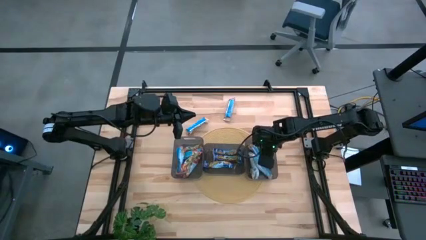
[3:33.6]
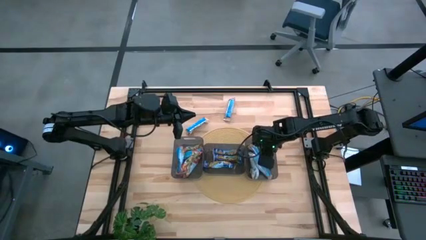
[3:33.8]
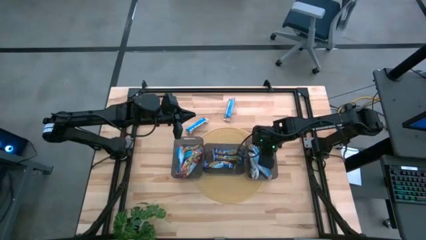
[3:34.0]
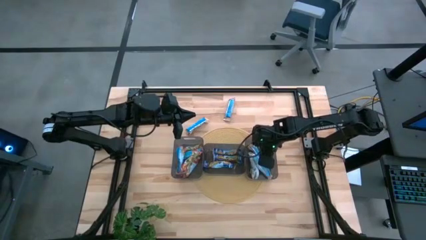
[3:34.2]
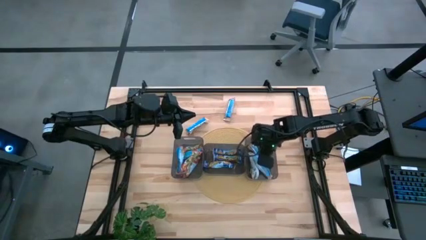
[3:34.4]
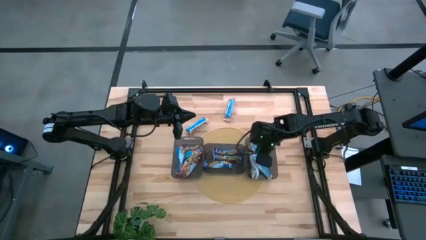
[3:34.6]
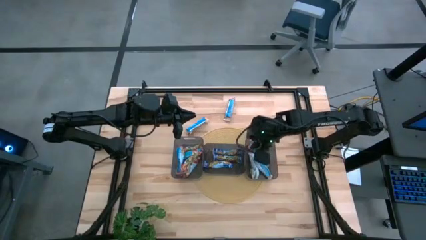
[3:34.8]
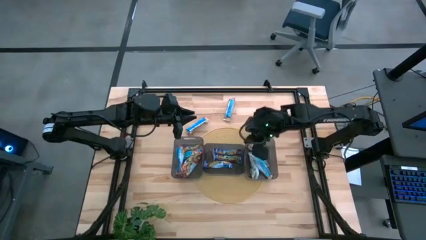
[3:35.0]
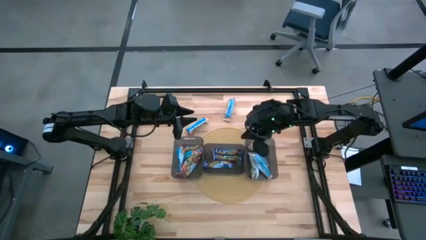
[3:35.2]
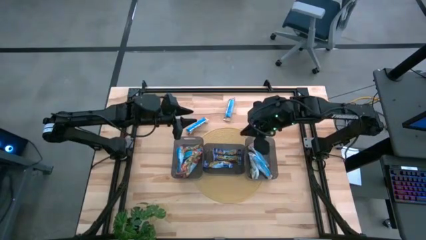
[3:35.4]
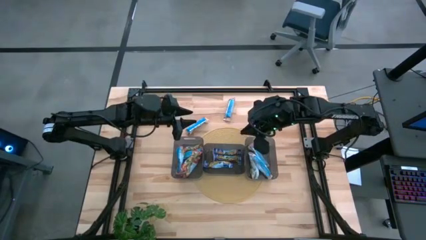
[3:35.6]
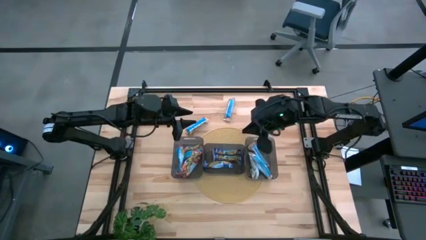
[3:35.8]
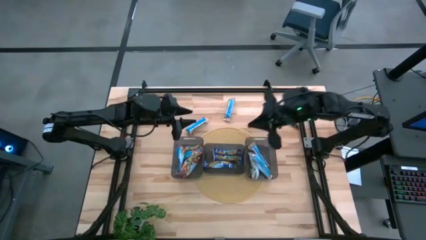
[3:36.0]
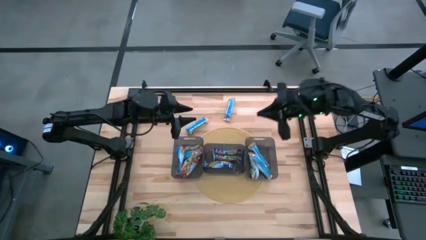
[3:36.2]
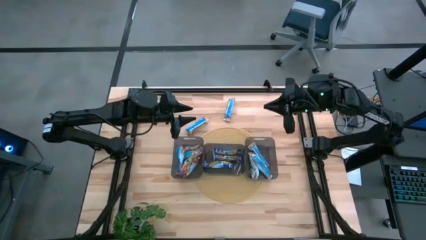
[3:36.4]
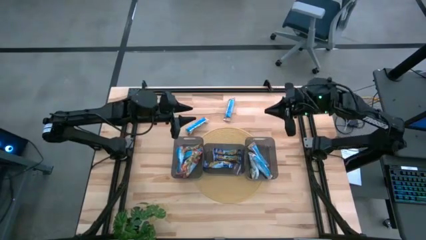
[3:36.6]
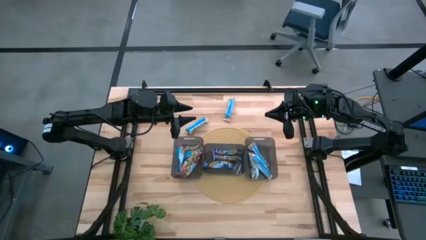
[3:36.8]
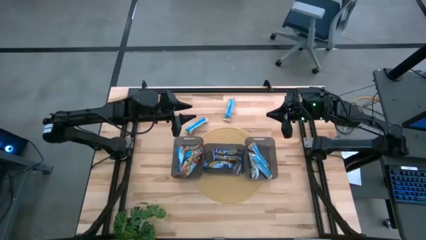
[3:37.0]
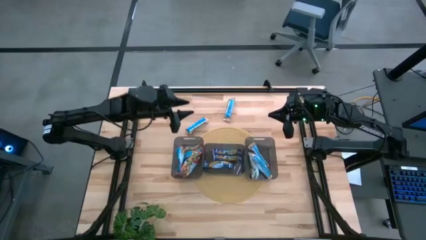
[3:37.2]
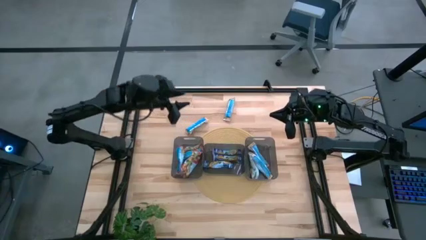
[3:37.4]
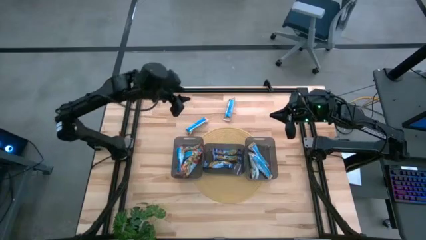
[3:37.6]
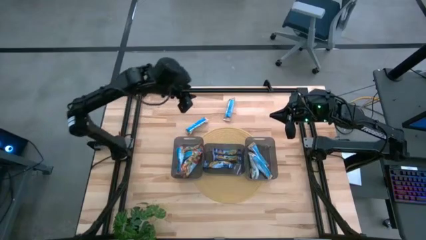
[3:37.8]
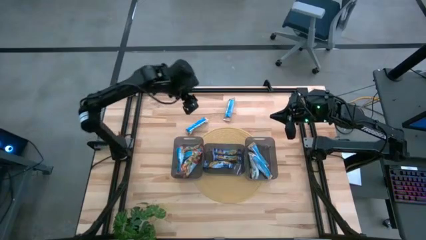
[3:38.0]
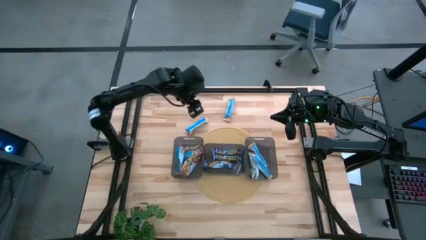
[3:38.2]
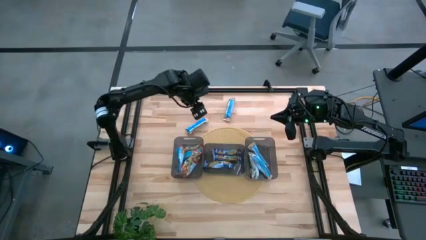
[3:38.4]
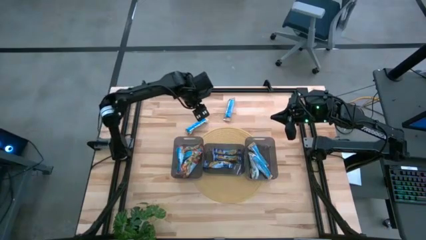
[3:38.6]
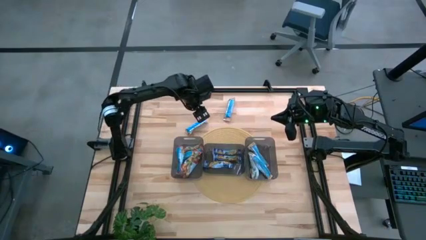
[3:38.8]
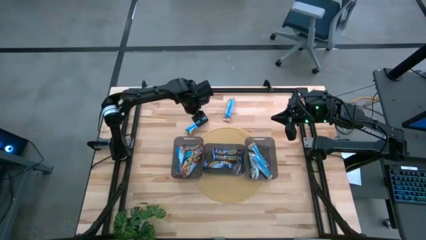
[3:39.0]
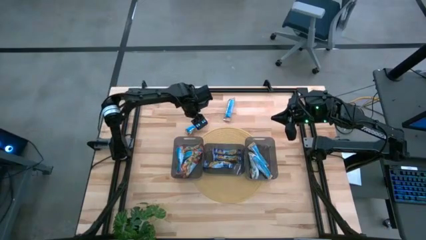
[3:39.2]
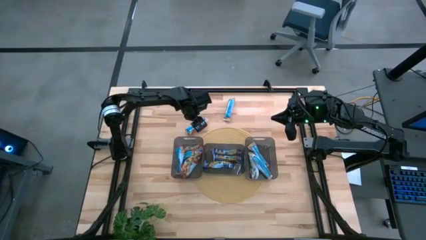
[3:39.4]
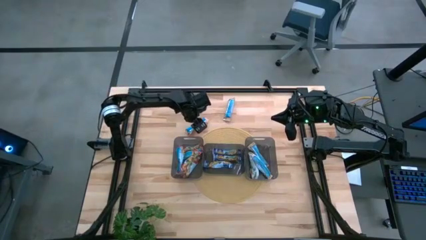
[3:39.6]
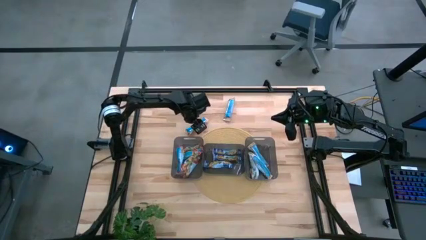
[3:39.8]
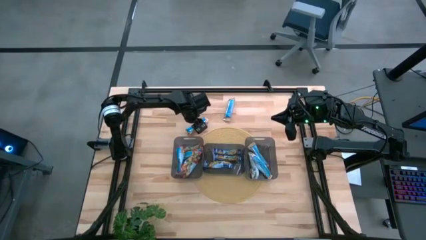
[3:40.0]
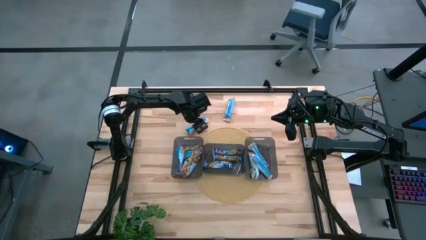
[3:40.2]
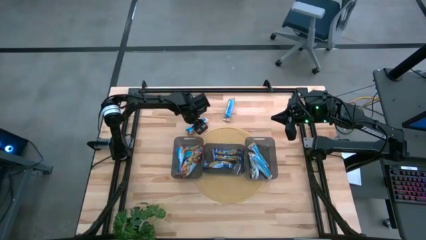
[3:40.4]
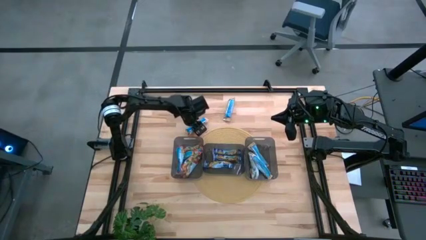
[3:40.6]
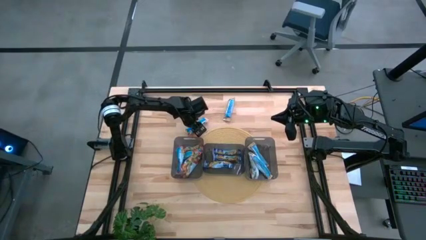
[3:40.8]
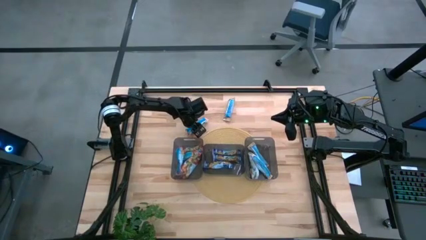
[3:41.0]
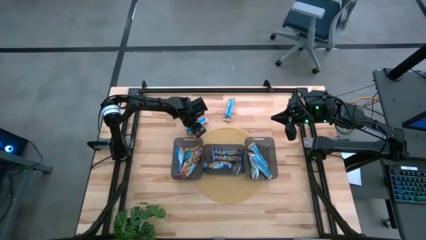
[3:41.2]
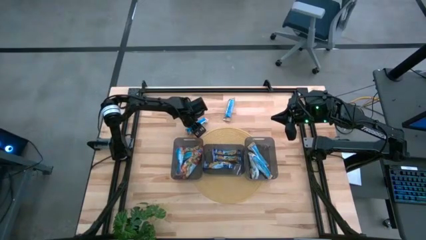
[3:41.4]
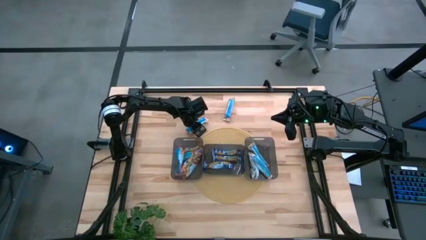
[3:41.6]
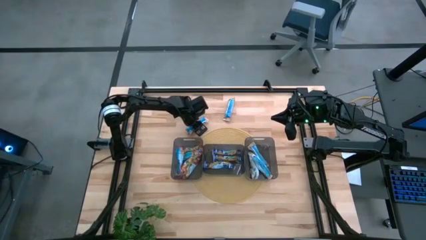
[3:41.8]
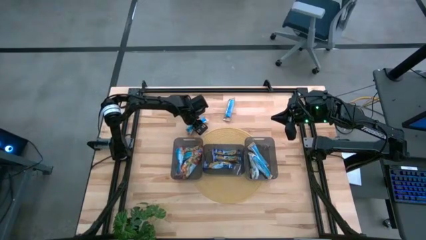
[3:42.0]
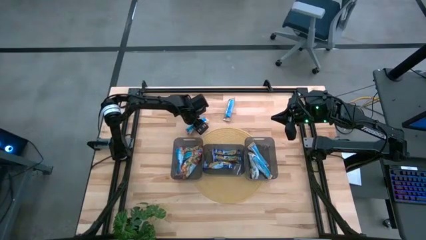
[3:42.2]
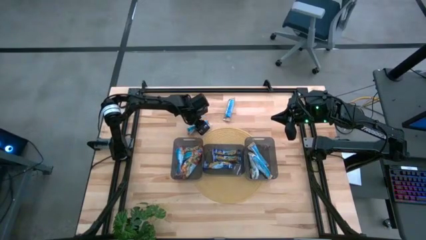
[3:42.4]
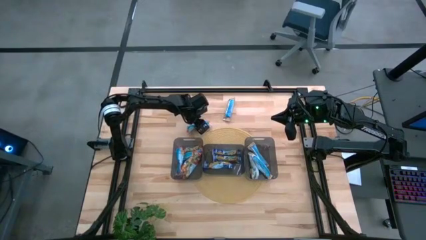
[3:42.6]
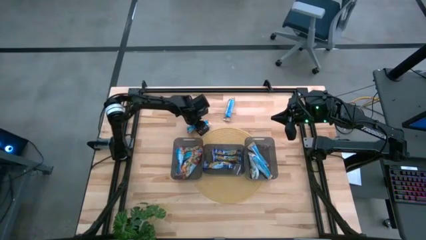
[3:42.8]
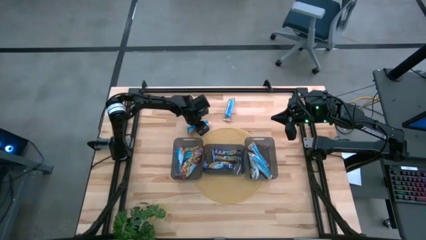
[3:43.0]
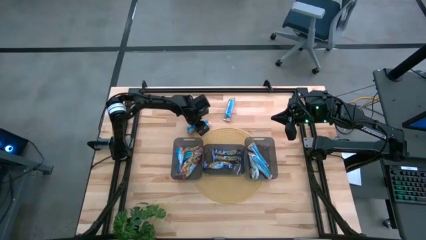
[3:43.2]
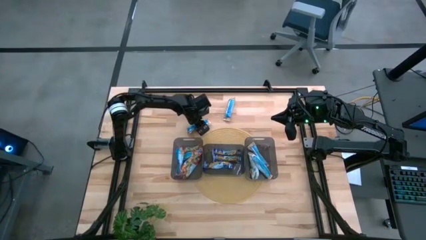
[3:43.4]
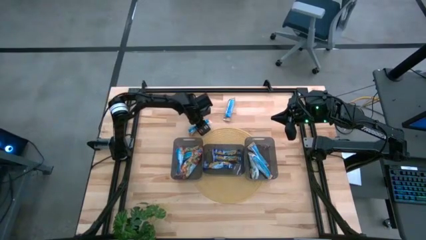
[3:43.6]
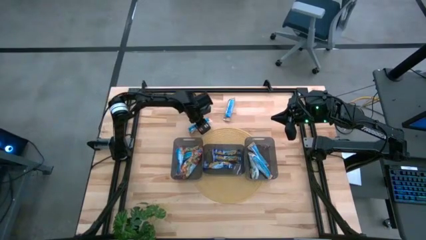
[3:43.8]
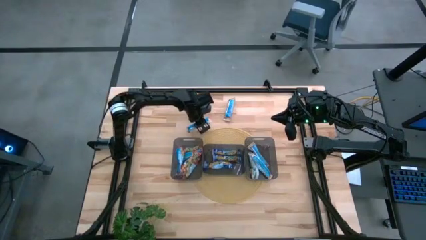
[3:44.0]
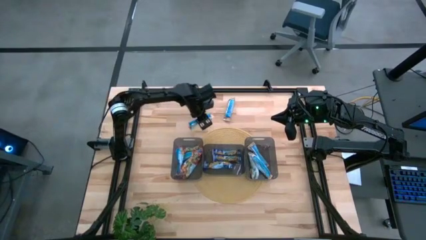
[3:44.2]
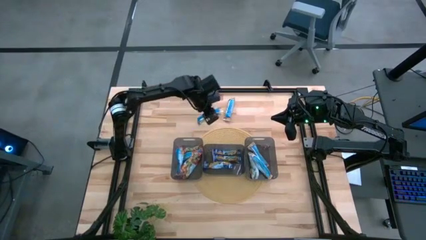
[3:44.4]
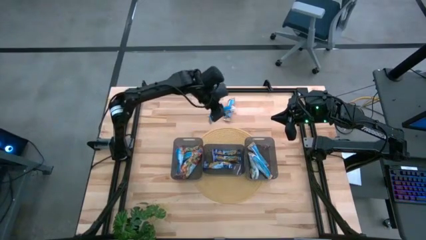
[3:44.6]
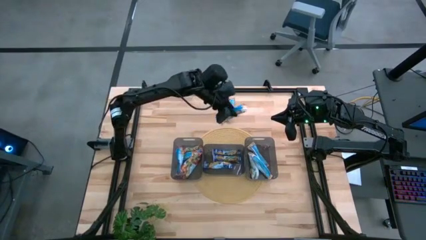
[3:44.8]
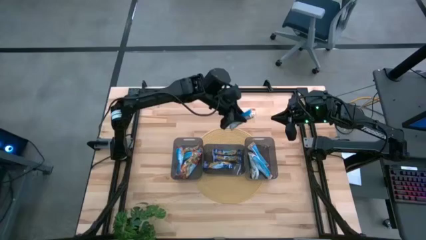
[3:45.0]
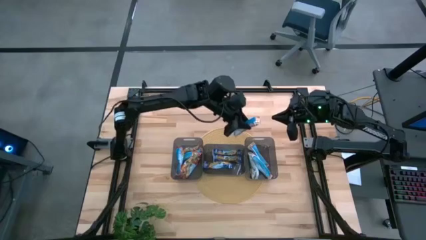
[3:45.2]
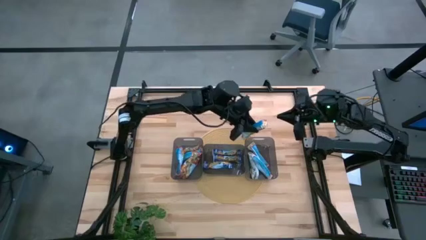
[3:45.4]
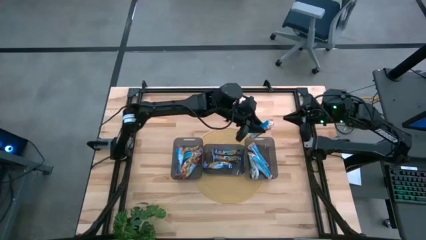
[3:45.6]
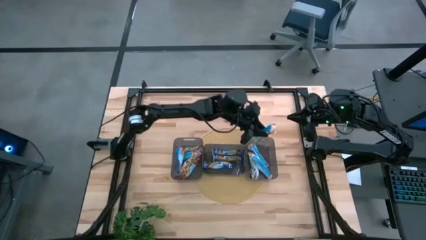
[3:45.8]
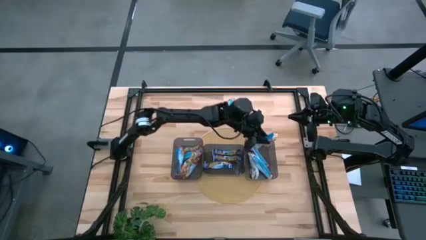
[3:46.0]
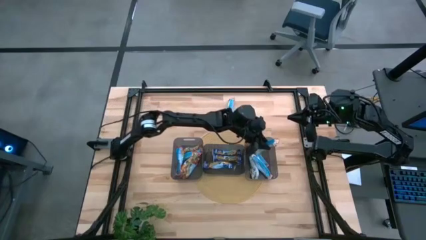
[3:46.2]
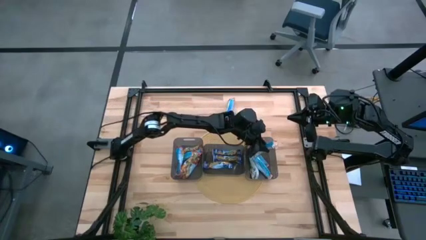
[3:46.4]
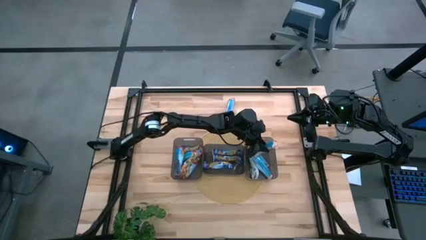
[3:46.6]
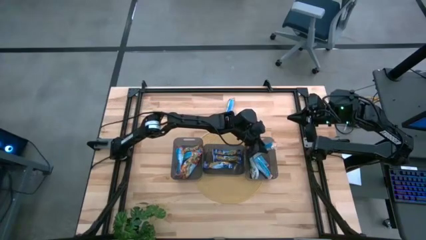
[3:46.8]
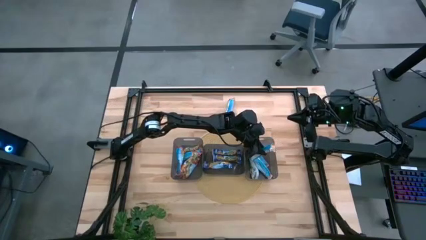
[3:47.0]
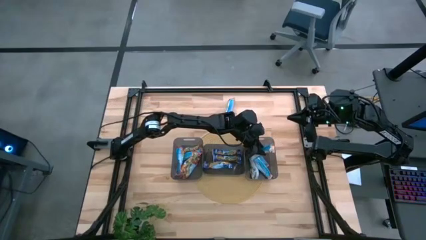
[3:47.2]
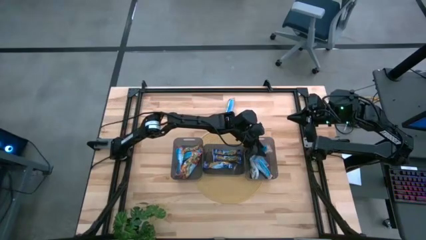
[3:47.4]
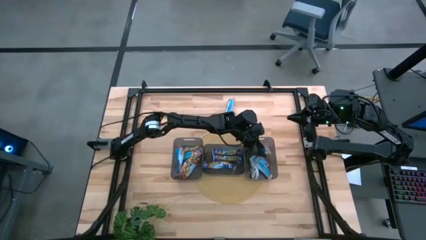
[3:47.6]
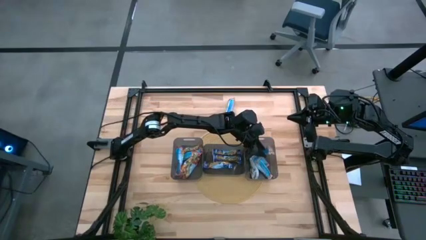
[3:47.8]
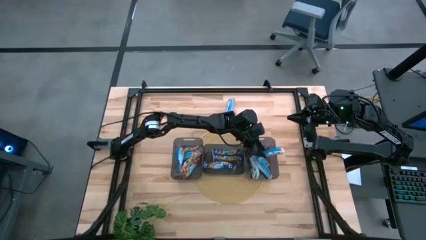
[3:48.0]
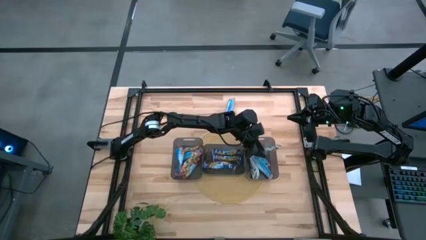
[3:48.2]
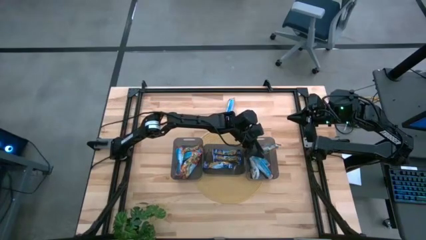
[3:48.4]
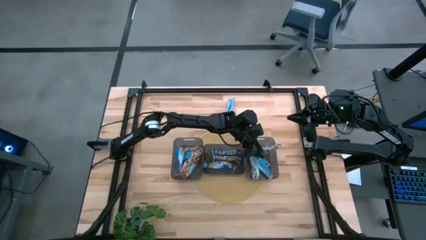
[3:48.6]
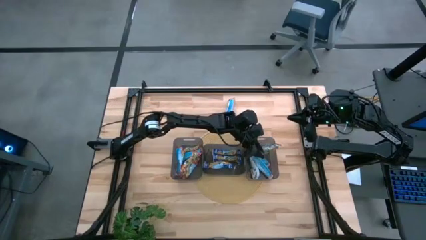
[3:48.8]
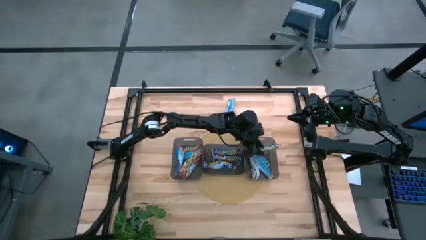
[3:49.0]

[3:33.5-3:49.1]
Task: Pick and place Granola Bars by type
Put the orange granola bar into the right black bin
